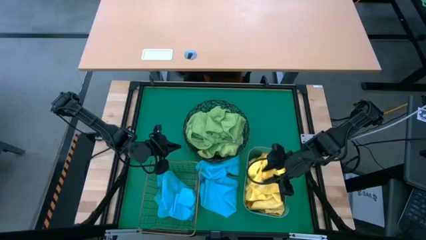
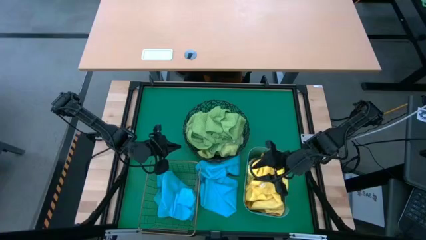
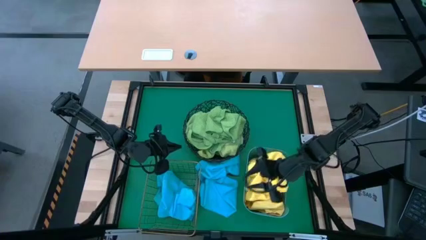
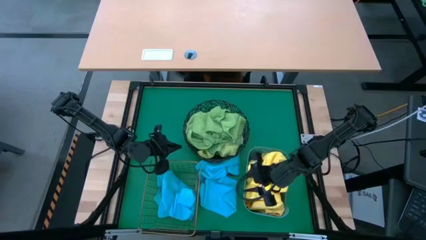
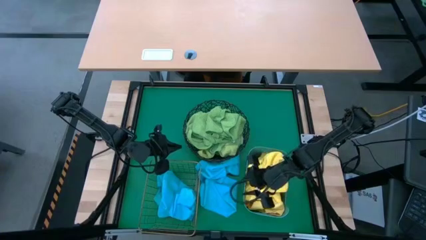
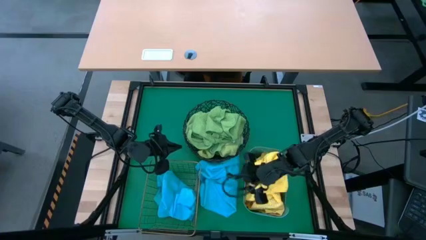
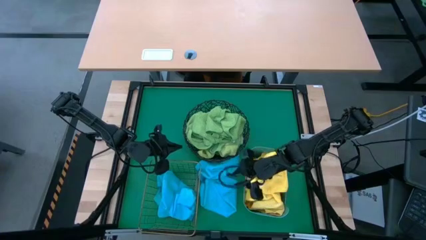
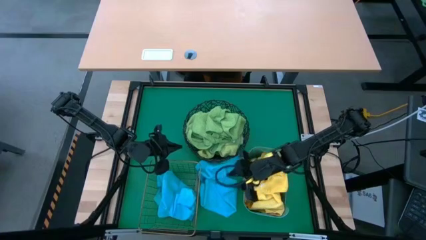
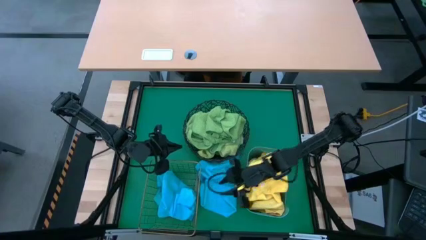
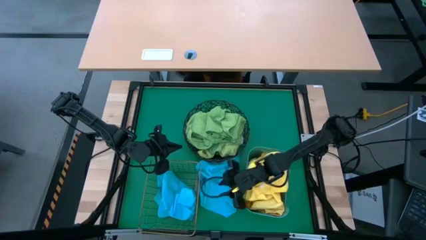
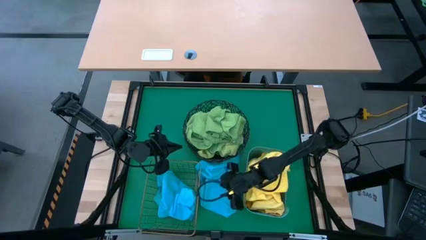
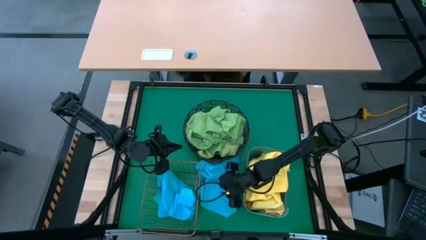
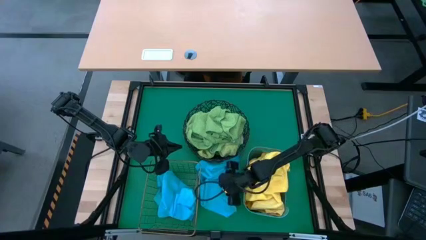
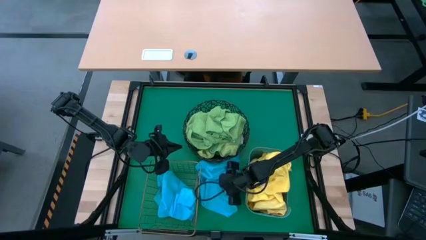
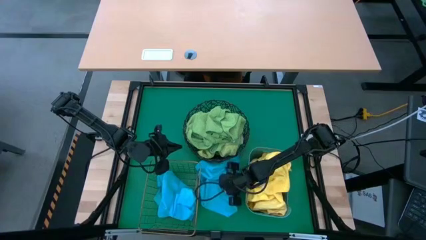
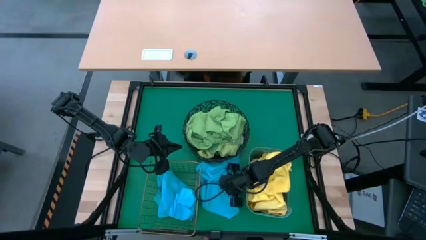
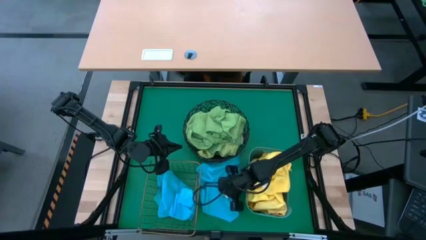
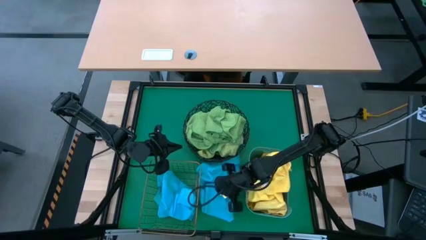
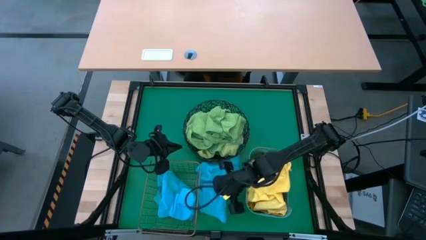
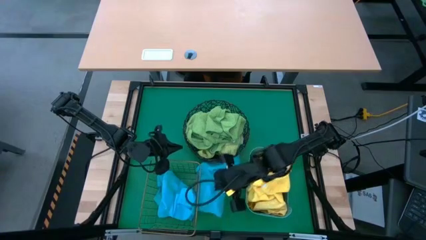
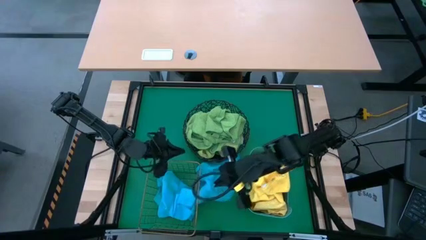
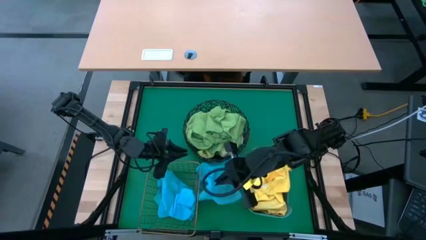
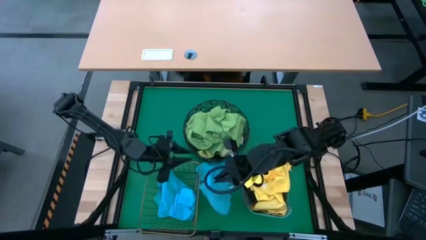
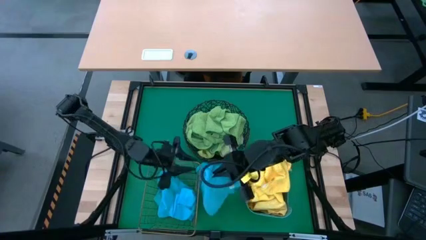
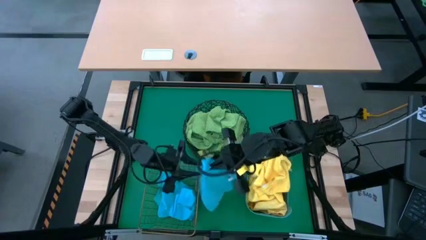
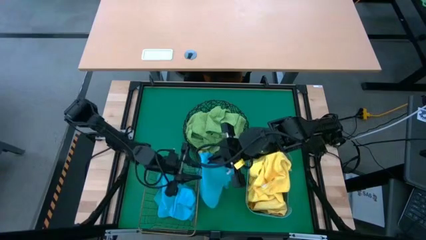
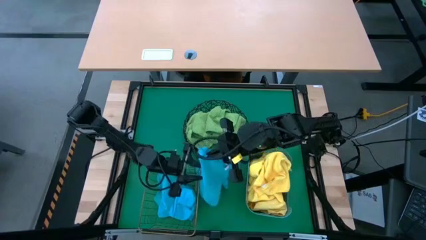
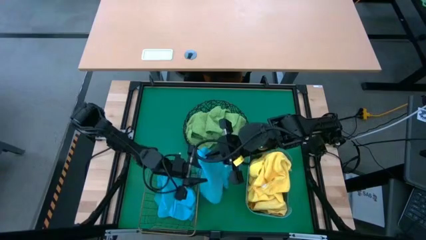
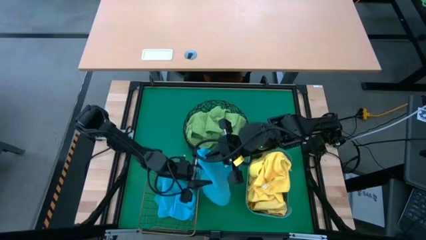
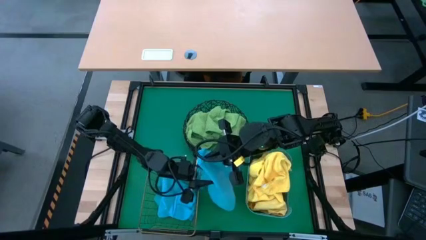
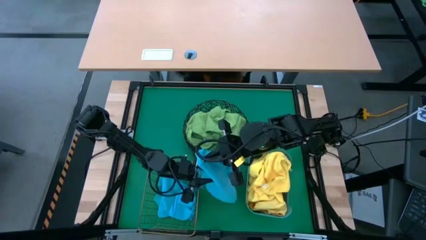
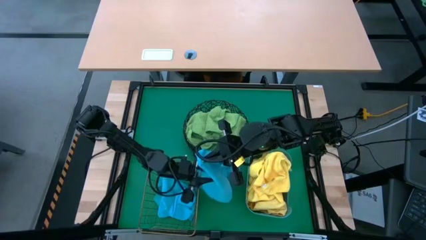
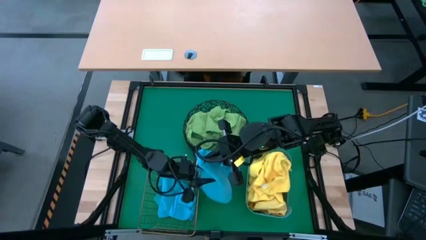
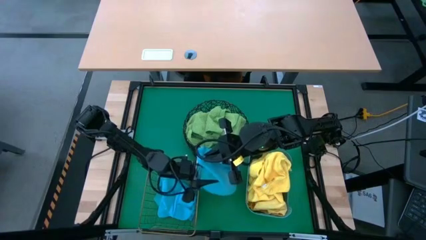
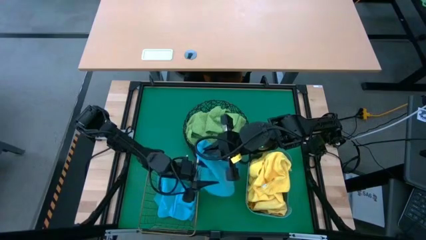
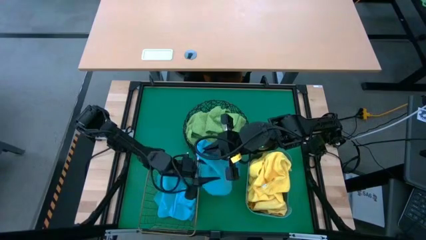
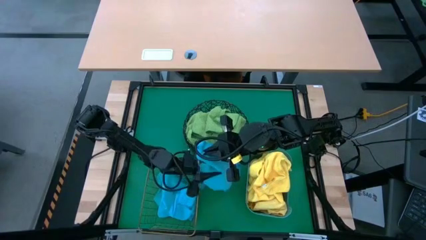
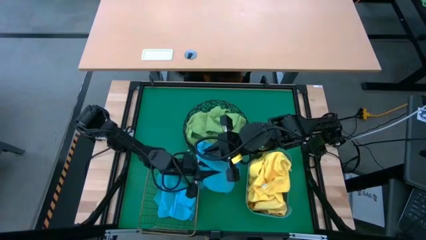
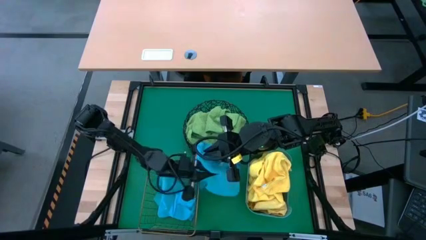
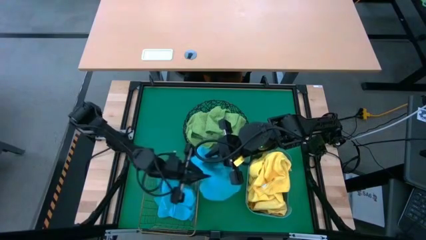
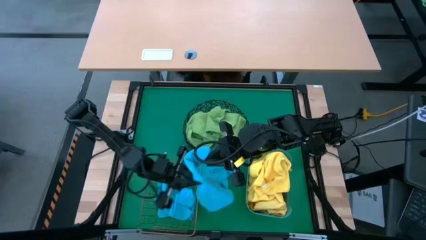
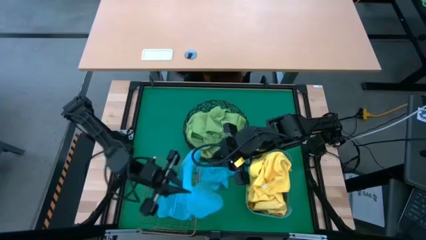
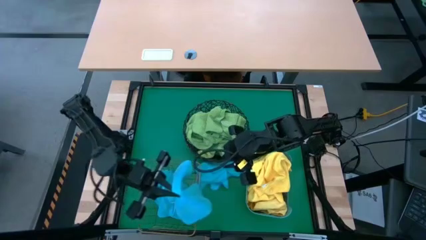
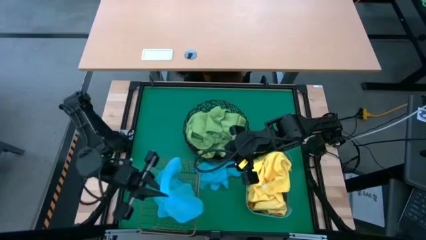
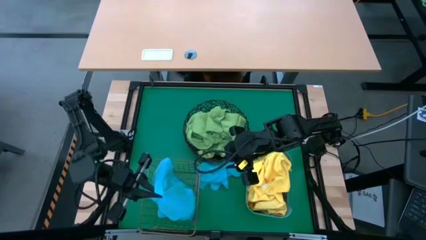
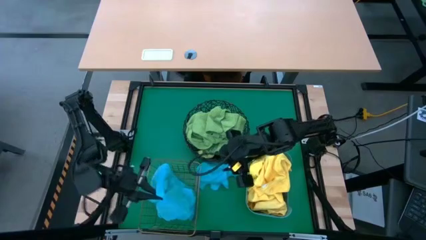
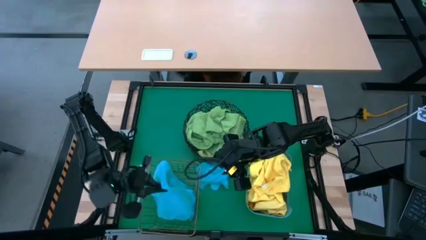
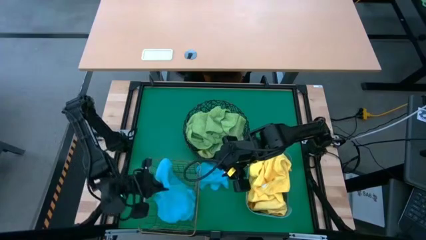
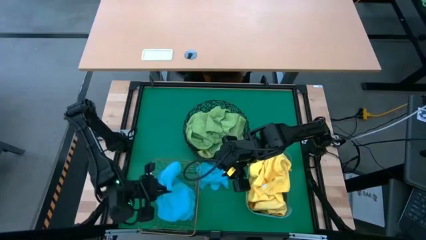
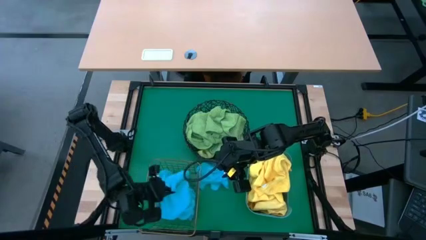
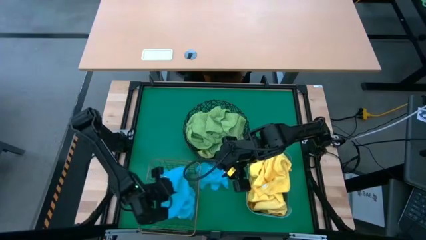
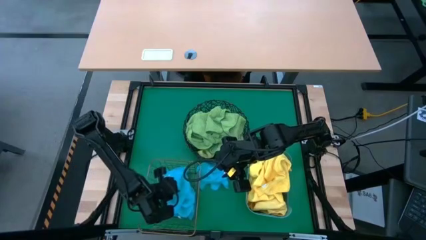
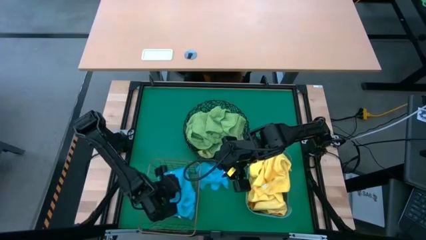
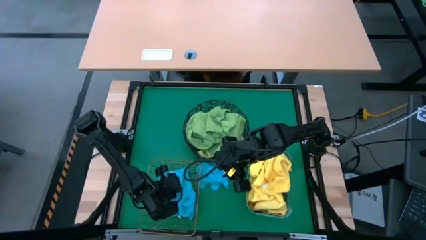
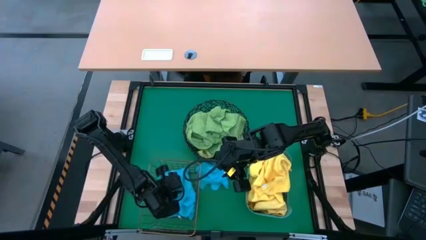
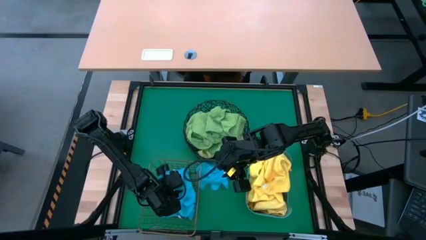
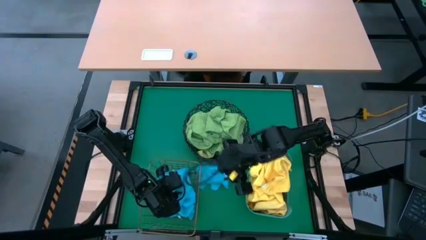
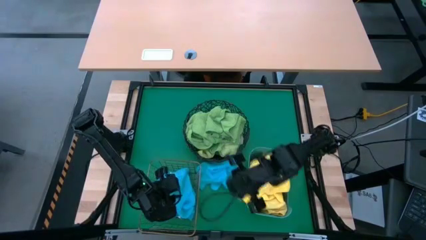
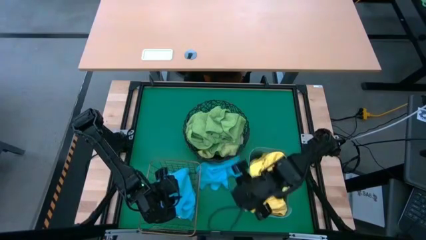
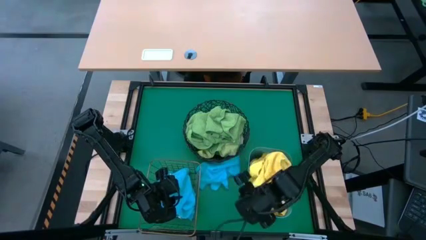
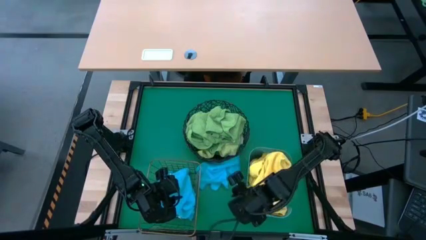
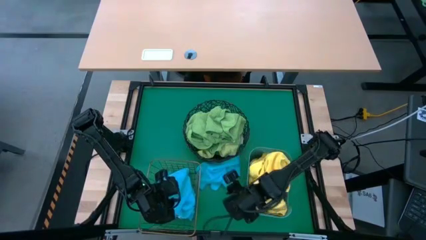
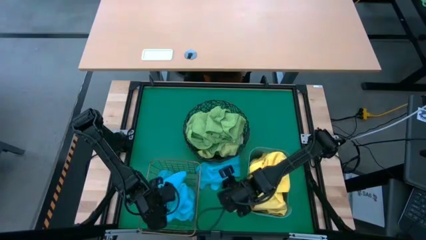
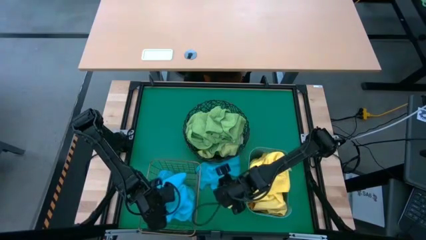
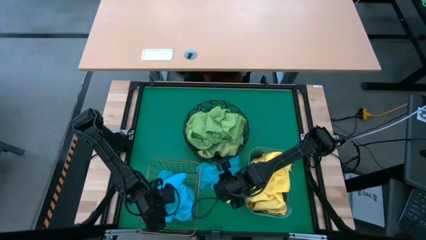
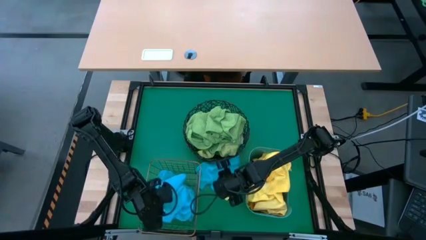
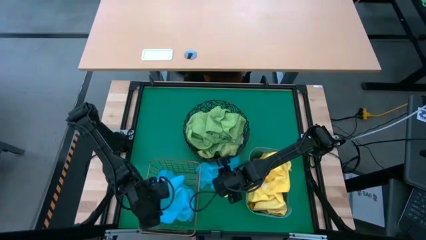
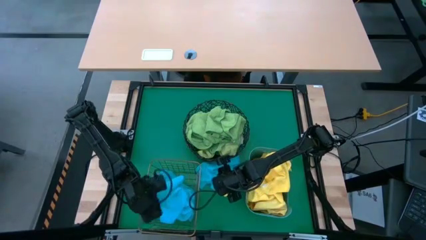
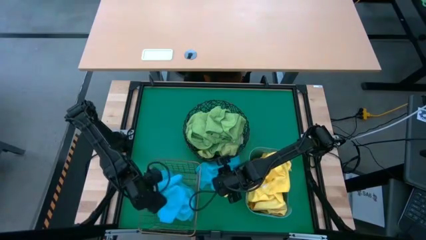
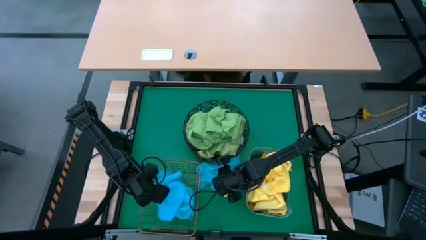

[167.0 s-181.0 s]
Task: Sort microfiber towel by color & place in baskets
Put the blue microfiber cloth into the wire basket
